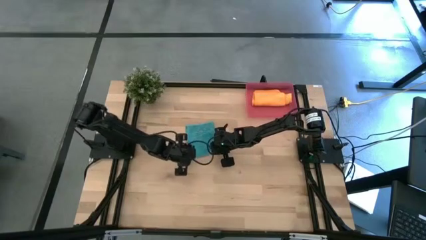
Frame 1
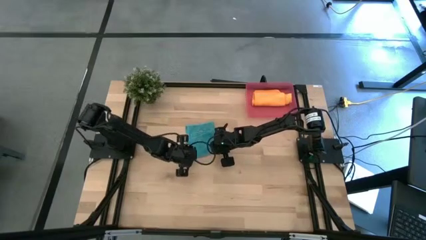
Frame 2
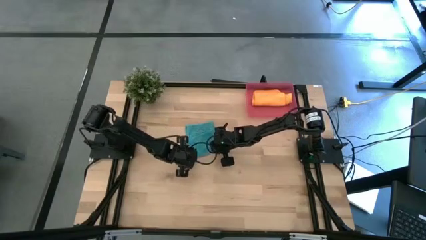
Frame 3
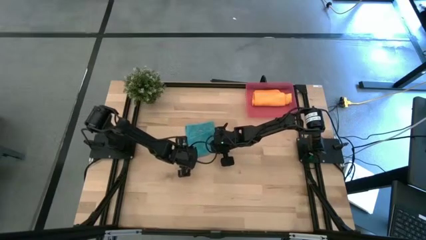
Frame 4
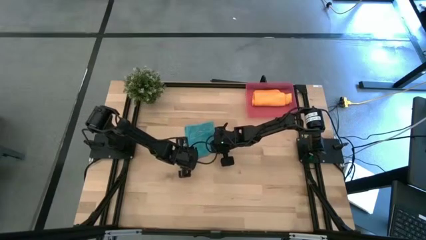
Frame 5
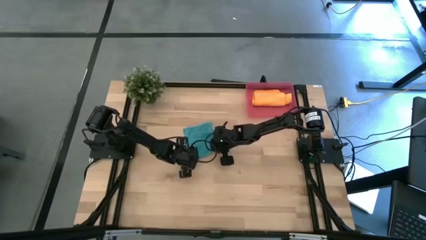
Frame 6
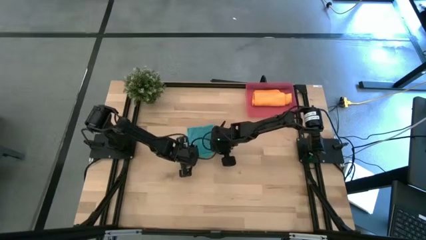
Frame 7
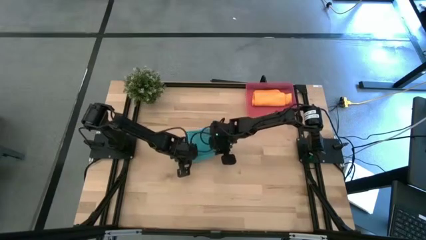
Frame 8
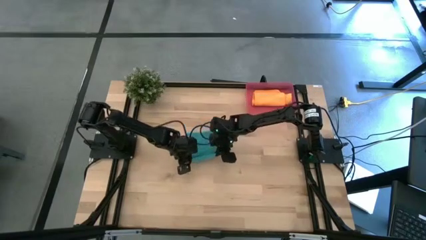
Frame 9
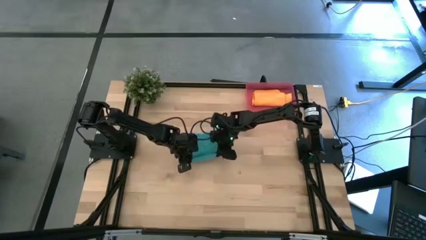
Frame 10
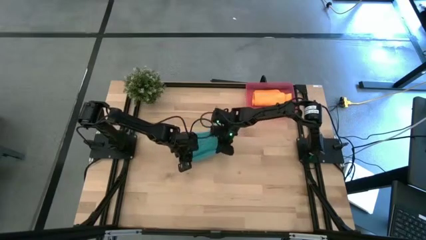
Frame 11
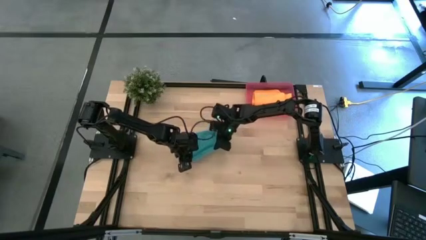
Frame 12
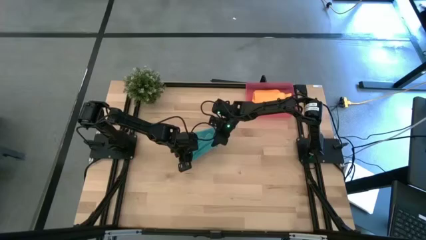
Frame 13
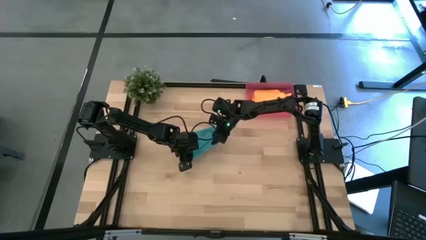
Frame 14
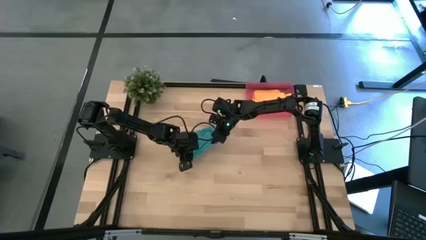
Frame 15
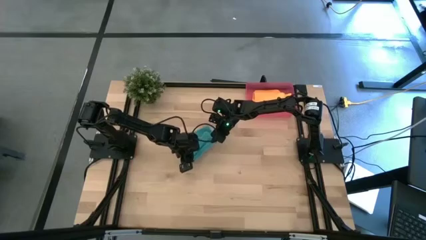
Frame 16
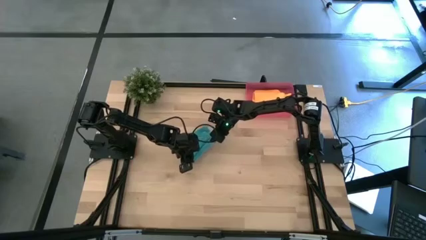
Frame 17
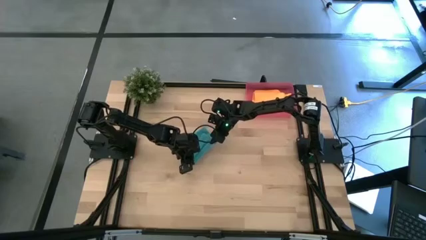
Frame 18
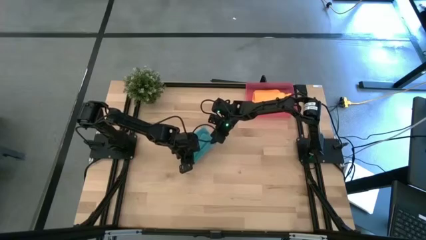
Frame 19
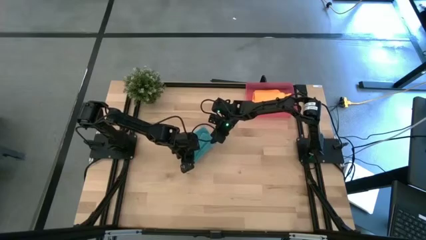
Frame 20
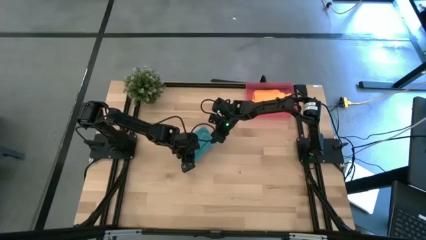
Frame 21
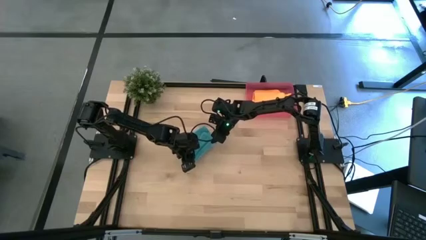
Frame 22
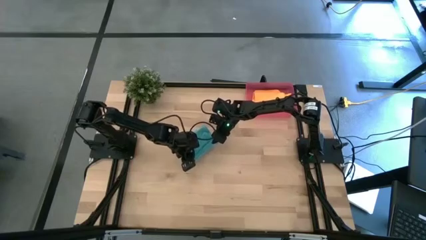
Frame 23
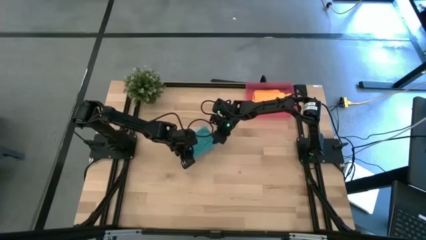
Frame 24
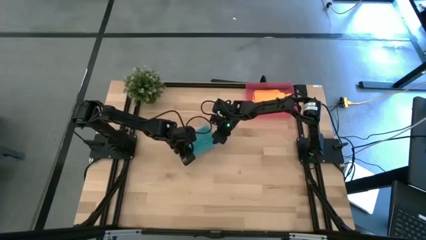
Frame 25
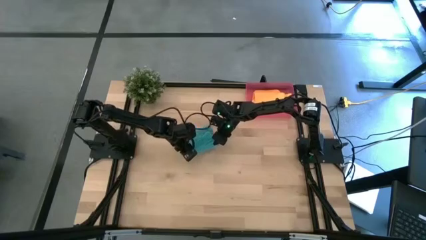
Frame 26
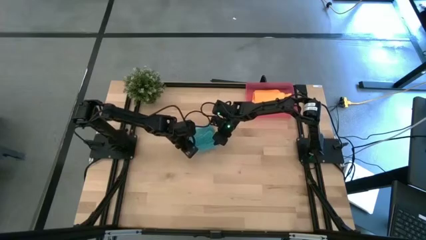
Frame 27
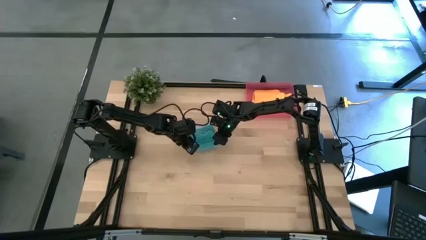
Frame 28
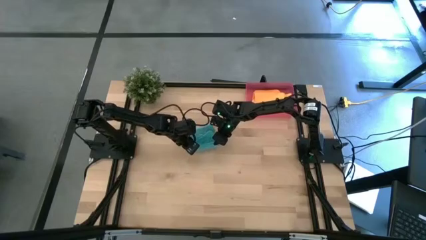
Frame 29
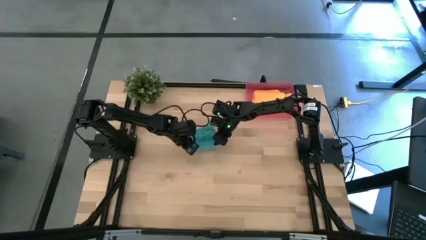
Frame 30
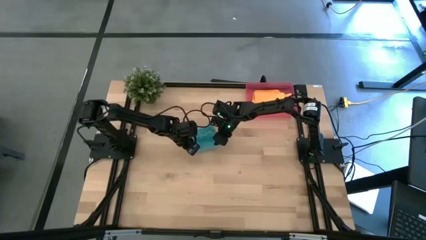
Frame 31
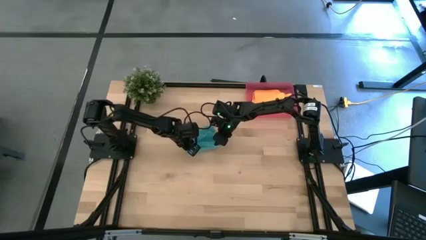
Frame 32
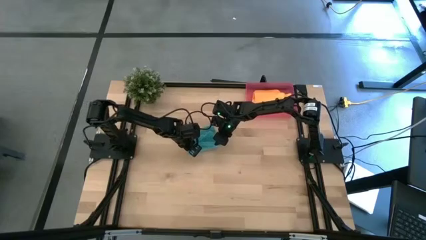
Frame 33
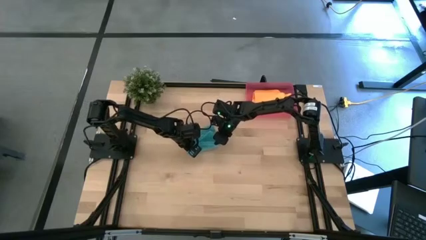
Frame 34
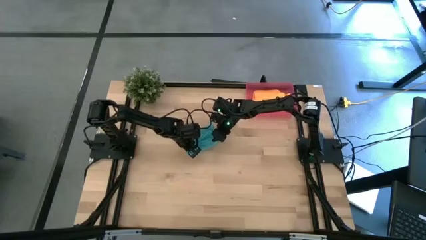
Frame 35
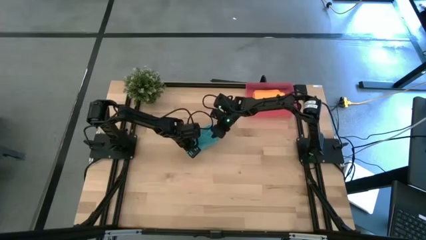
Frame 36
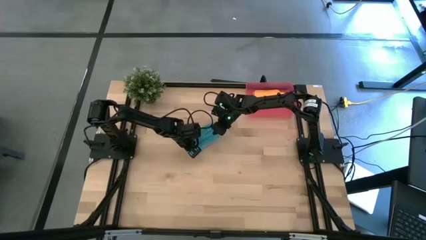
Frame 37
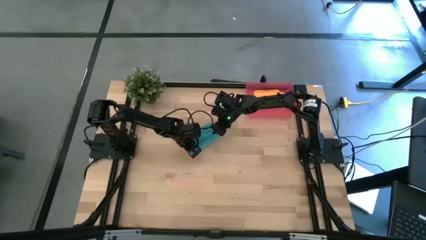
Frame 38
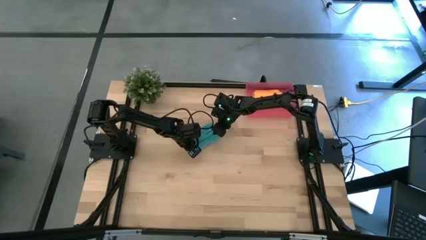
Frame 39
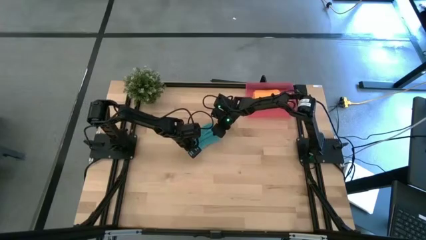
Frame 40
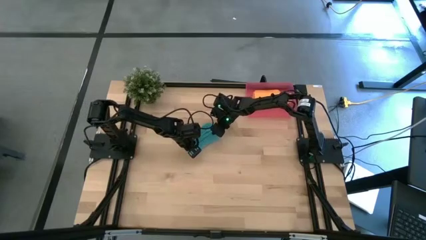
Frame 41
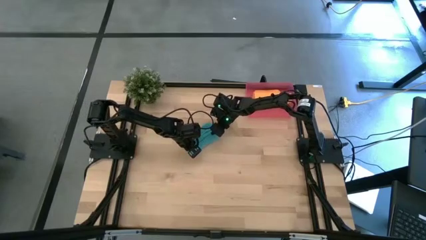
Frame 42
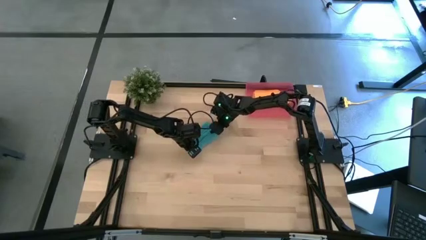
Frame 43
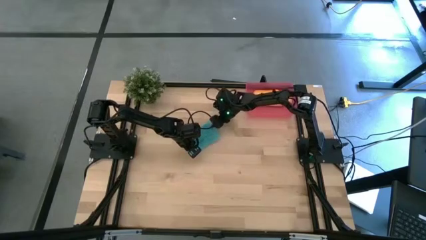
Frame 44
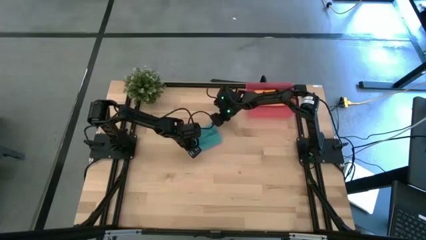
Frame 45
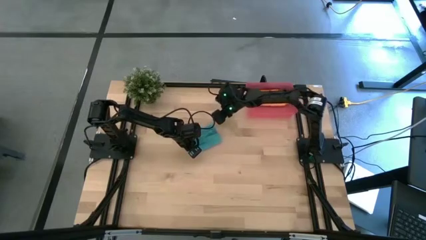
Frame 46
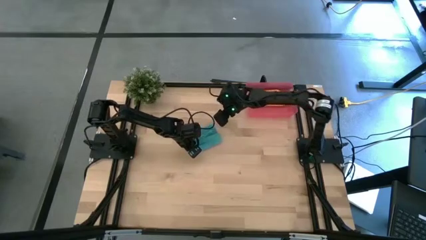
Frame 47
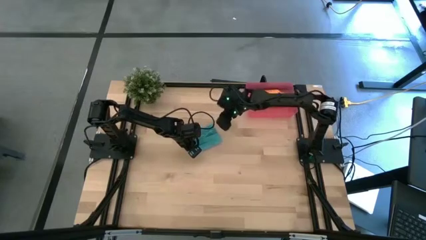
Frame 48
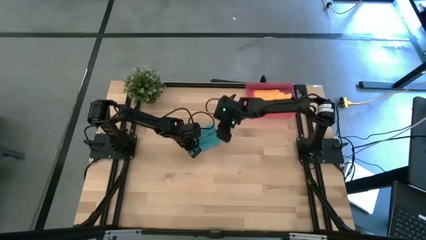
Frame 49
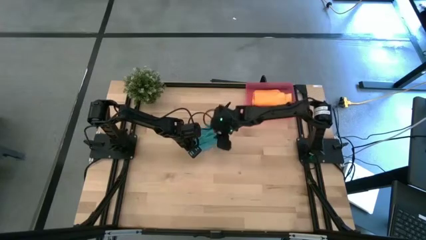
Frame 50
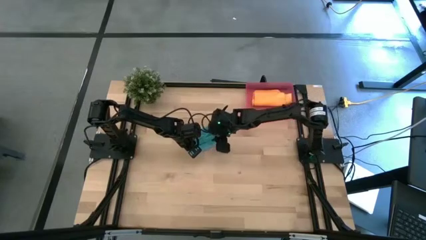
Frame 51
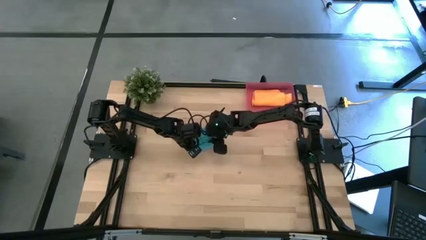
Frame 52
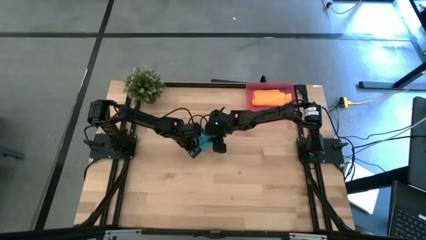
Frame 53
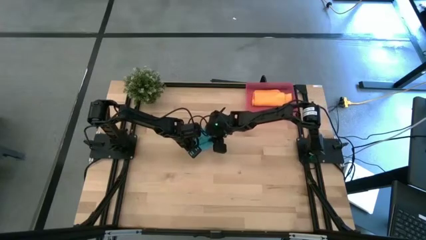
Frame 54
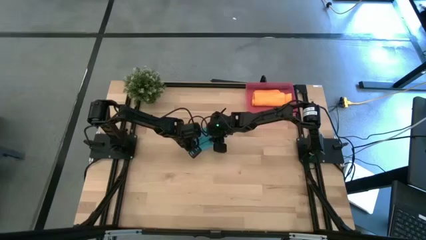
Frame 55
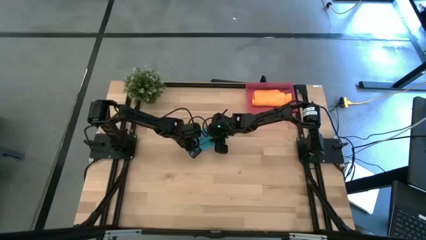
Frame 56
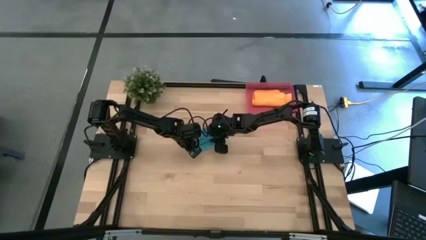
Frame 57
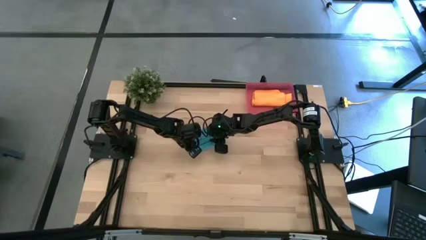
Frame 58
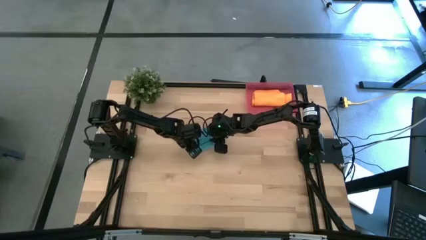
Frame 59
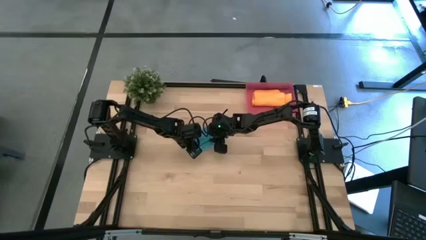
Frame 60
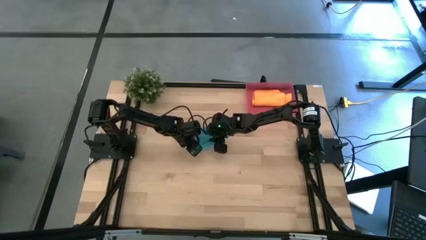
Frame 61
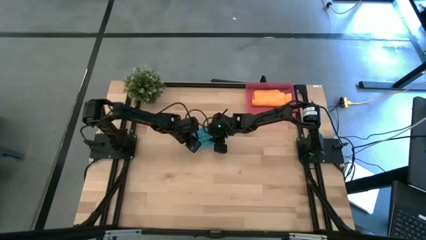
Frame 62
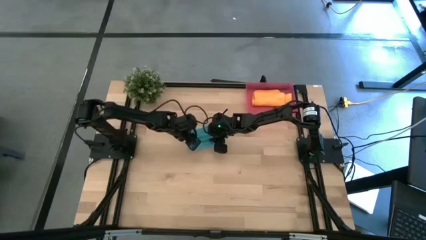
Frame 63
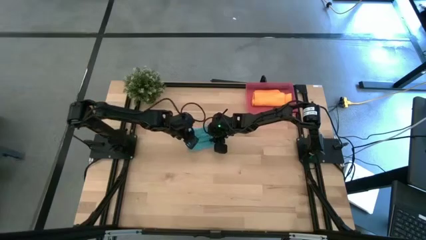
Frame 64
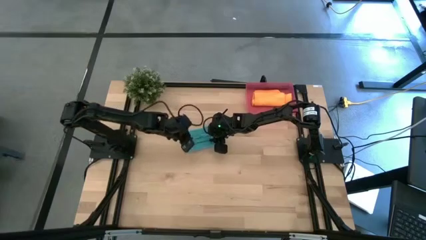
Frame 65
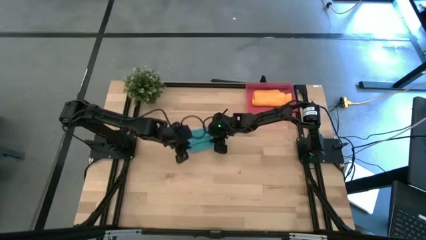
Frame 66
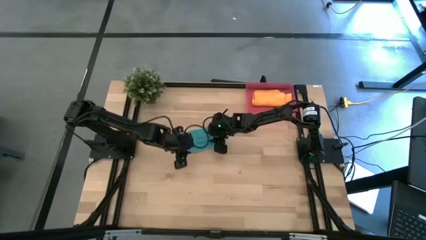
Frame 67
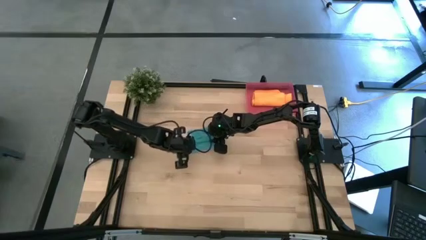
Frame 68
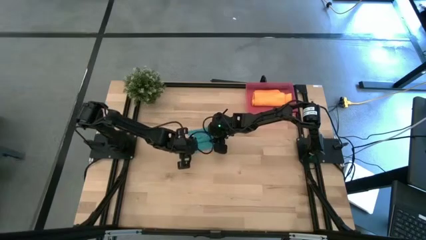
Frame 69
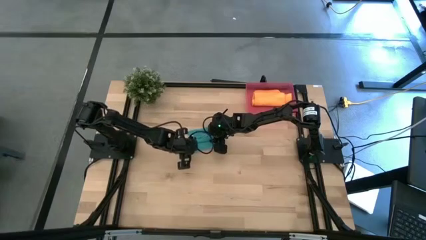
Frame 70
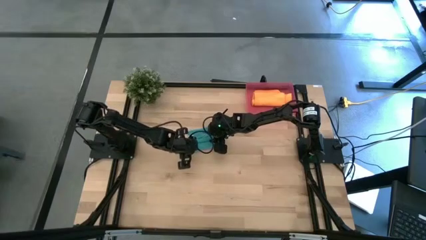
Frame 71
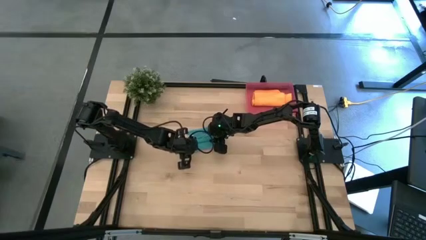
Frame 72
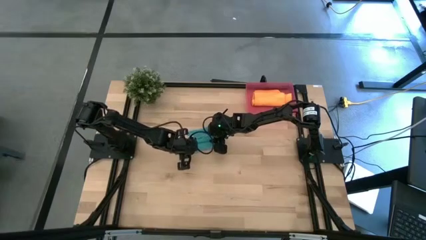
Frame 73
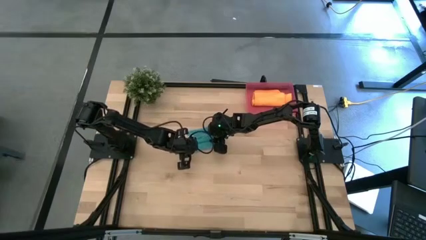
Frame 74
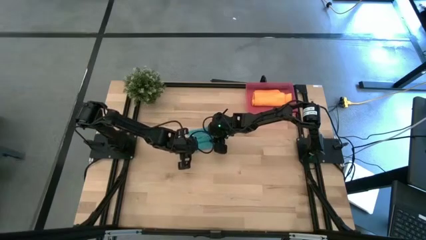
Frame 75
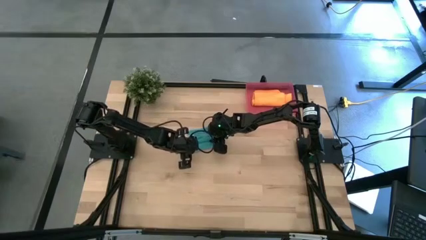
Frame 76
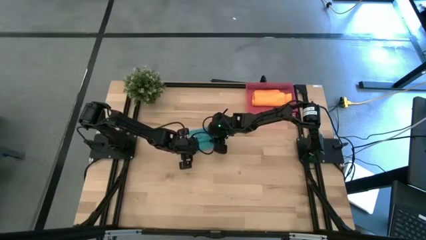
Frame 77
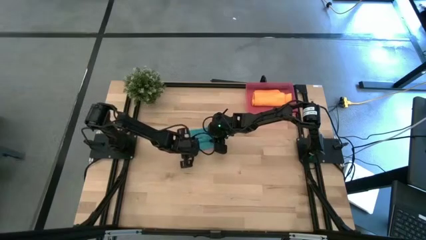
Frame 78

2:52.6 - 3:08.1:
Task: Roll microfiber towels into tight, uniform cylinder then place into a basket
Roll the blue microfiber towel
